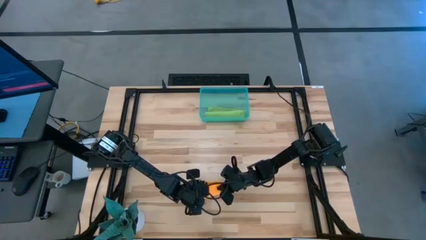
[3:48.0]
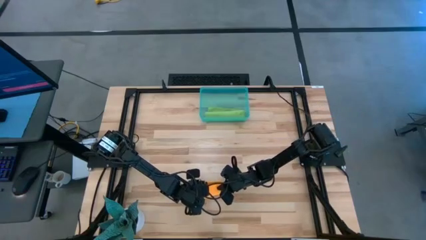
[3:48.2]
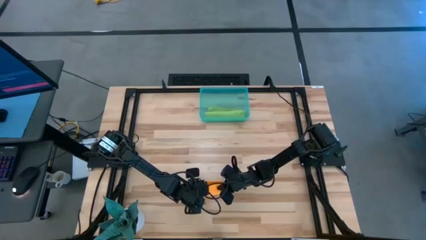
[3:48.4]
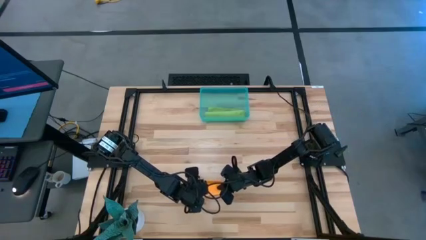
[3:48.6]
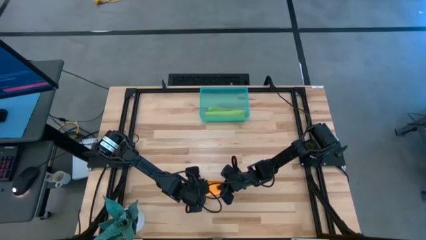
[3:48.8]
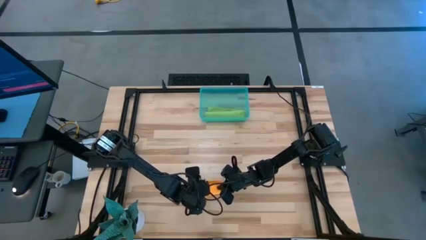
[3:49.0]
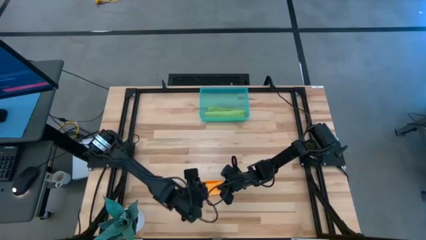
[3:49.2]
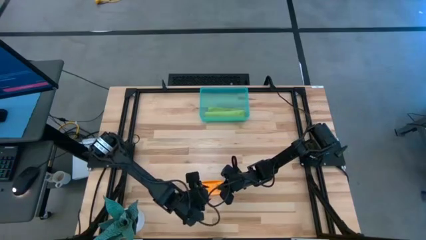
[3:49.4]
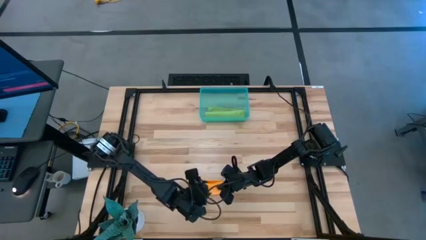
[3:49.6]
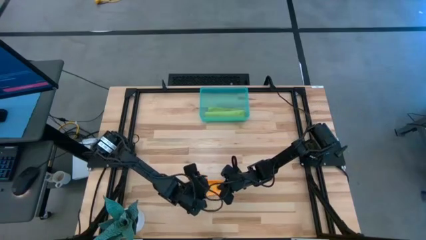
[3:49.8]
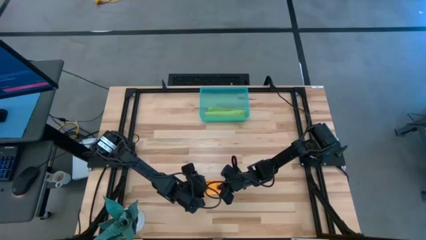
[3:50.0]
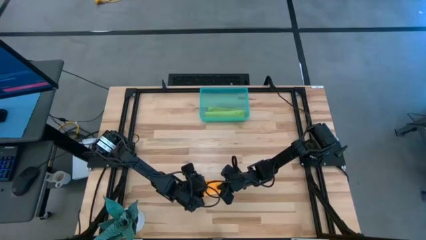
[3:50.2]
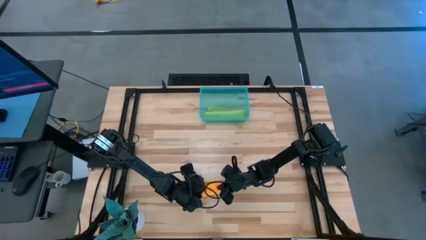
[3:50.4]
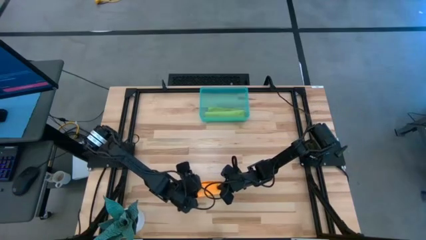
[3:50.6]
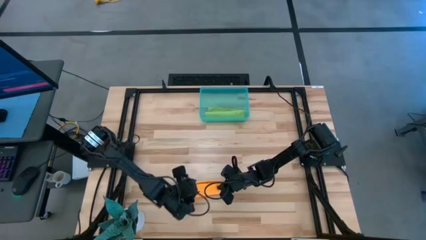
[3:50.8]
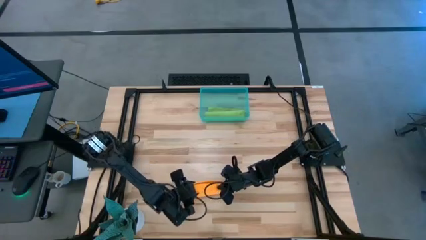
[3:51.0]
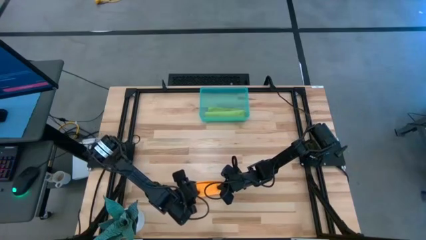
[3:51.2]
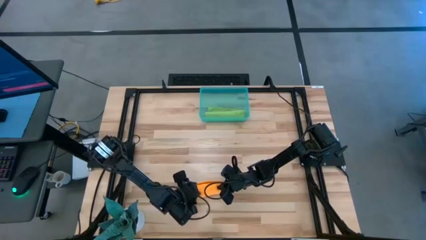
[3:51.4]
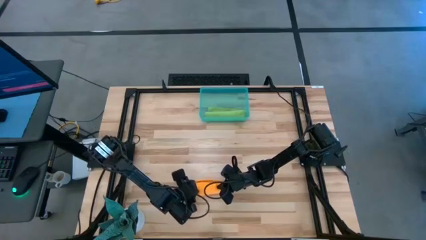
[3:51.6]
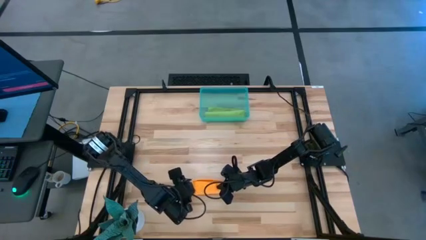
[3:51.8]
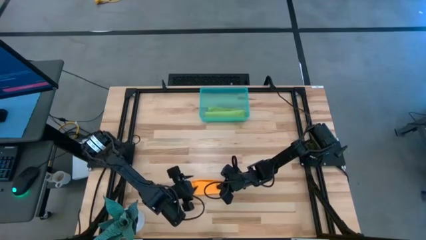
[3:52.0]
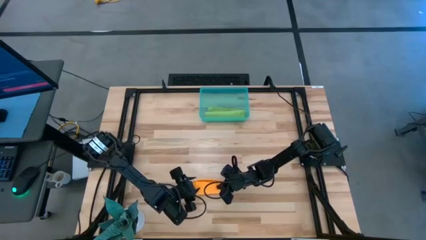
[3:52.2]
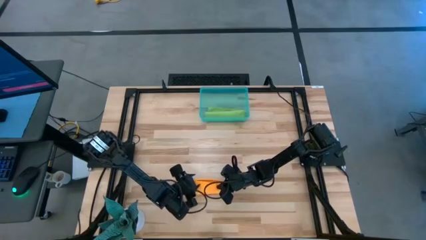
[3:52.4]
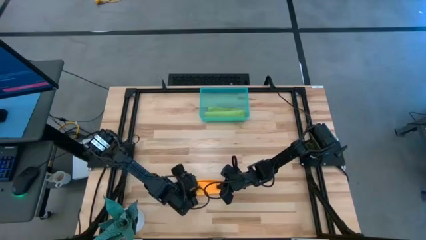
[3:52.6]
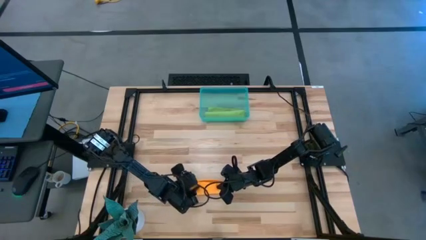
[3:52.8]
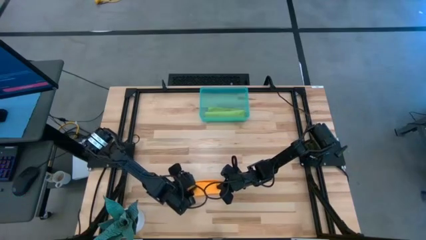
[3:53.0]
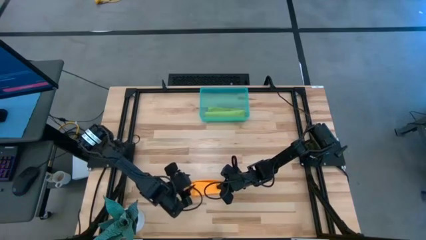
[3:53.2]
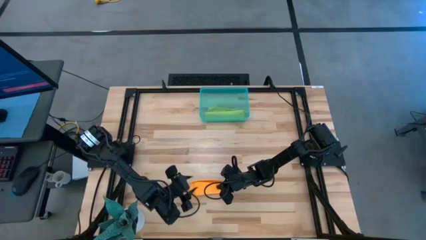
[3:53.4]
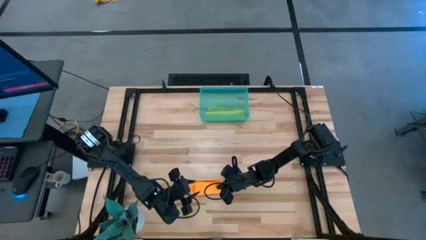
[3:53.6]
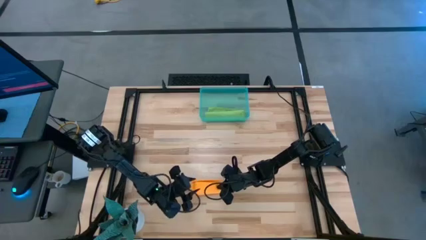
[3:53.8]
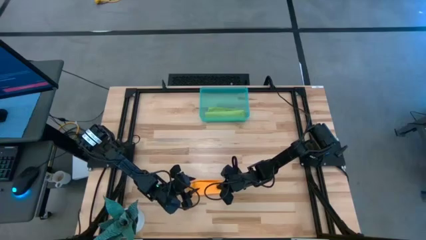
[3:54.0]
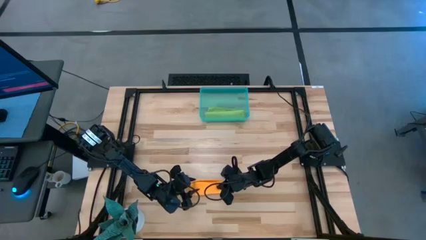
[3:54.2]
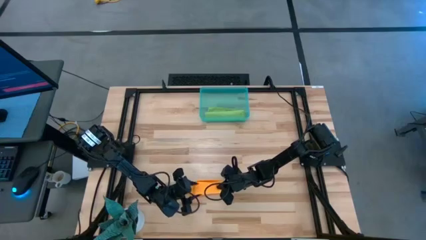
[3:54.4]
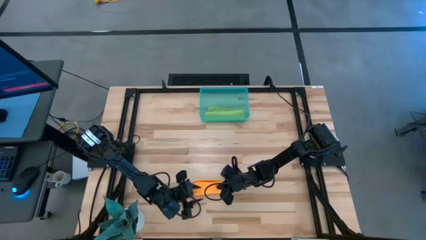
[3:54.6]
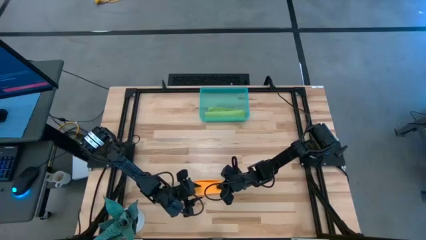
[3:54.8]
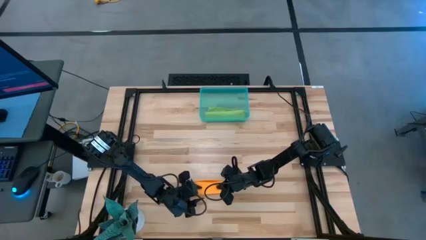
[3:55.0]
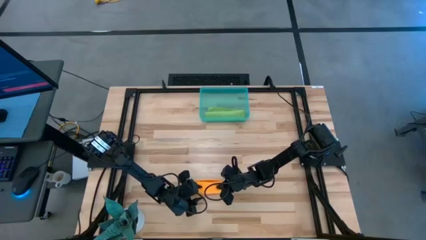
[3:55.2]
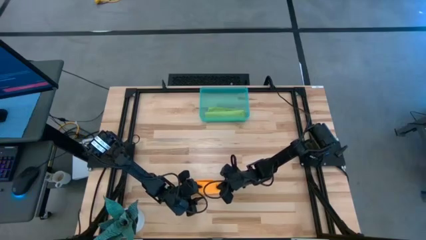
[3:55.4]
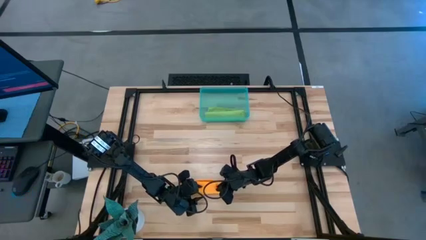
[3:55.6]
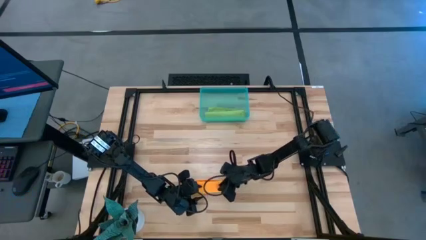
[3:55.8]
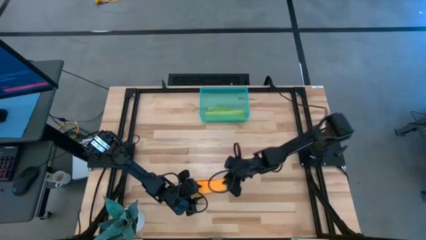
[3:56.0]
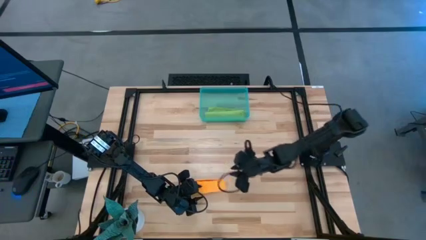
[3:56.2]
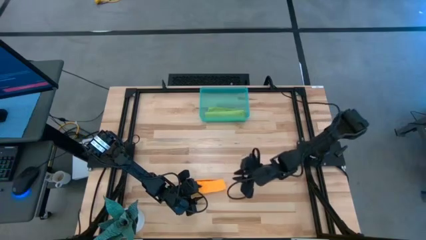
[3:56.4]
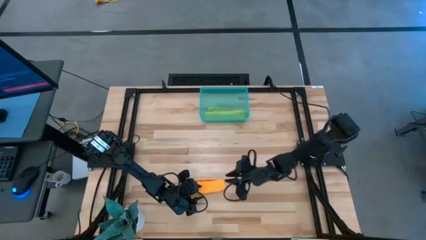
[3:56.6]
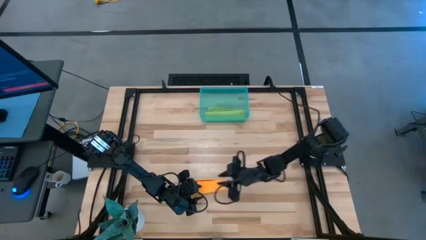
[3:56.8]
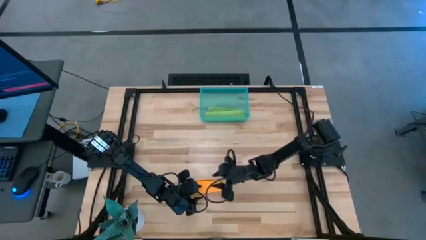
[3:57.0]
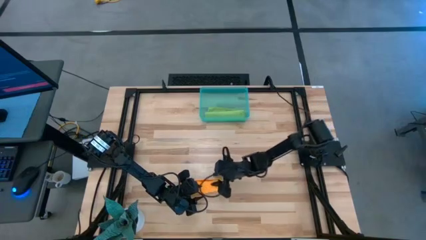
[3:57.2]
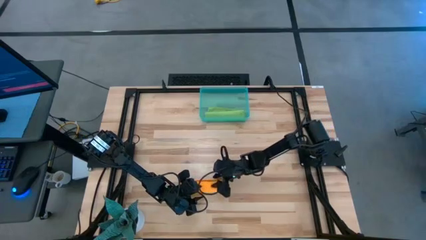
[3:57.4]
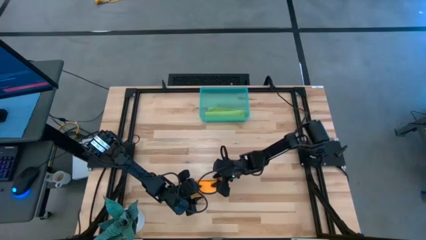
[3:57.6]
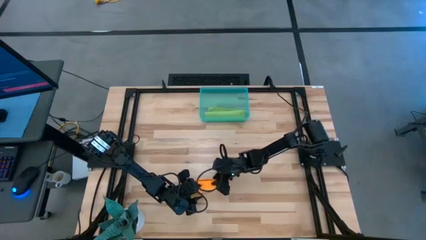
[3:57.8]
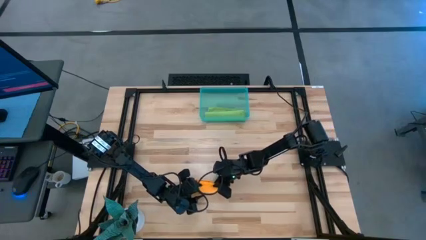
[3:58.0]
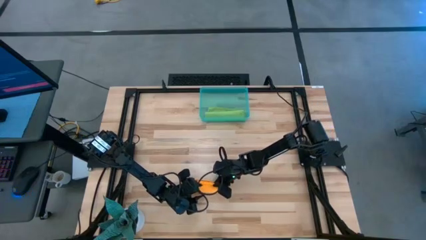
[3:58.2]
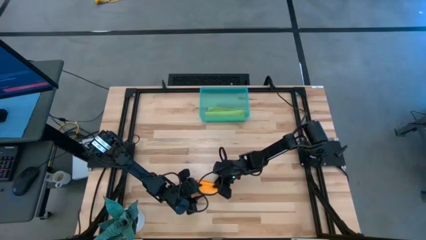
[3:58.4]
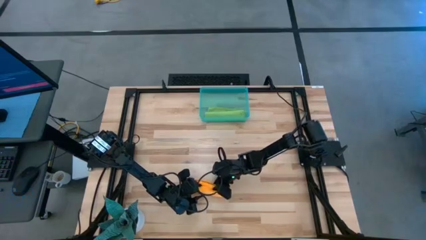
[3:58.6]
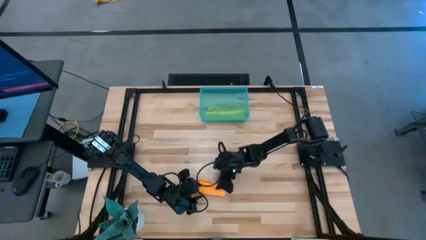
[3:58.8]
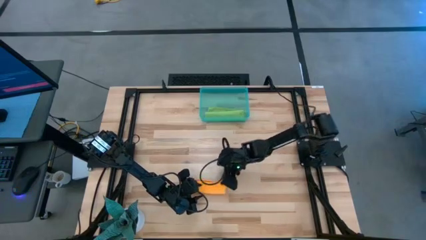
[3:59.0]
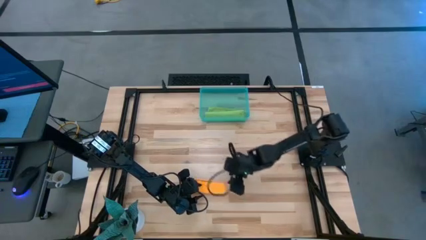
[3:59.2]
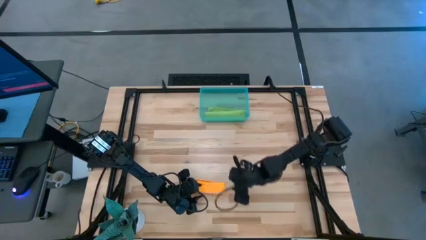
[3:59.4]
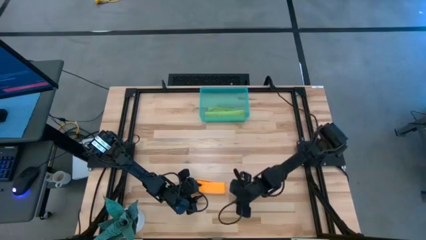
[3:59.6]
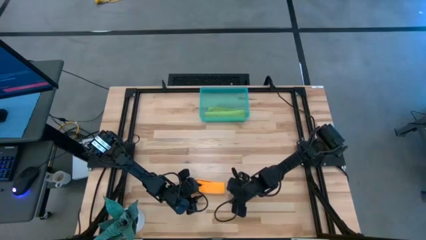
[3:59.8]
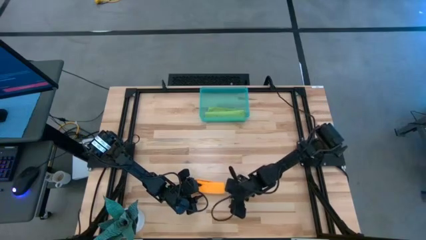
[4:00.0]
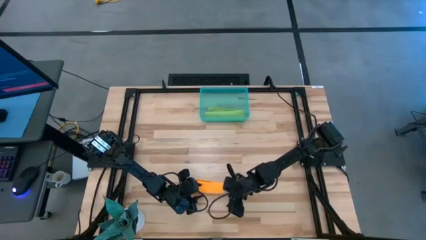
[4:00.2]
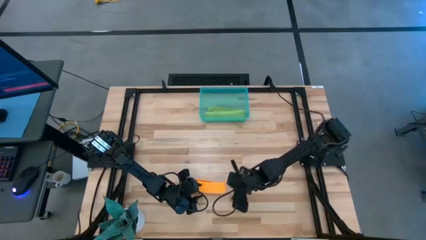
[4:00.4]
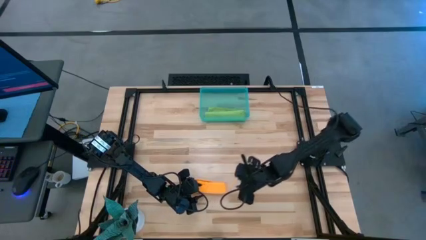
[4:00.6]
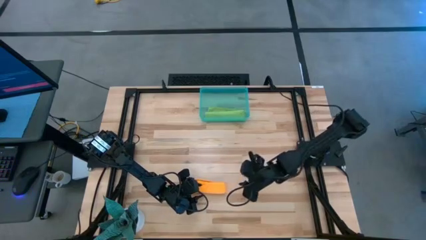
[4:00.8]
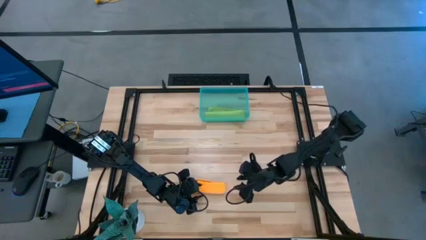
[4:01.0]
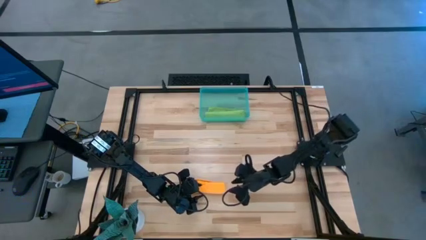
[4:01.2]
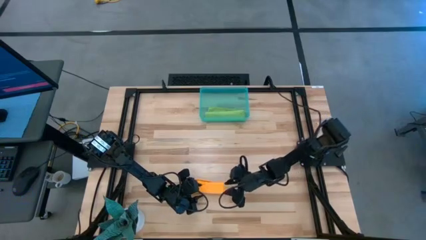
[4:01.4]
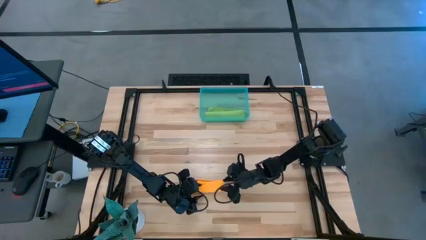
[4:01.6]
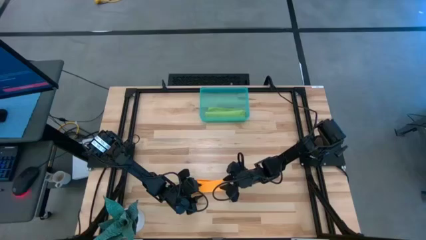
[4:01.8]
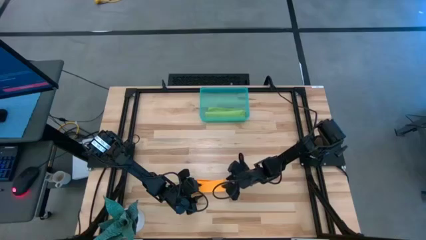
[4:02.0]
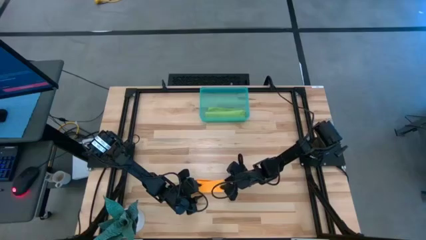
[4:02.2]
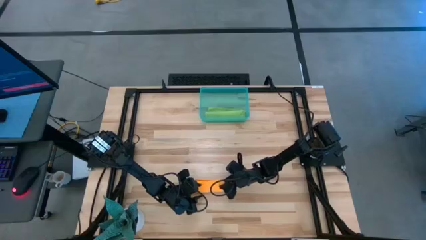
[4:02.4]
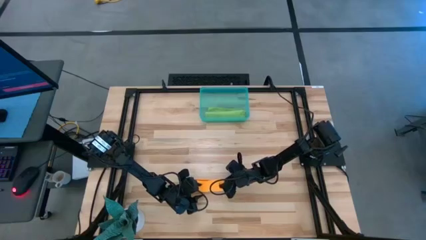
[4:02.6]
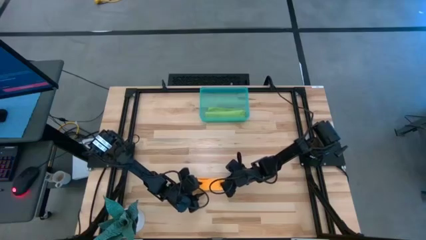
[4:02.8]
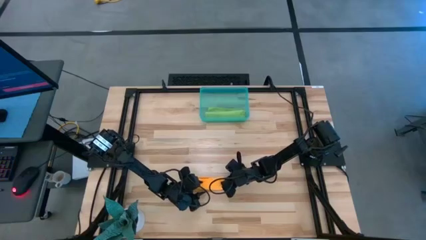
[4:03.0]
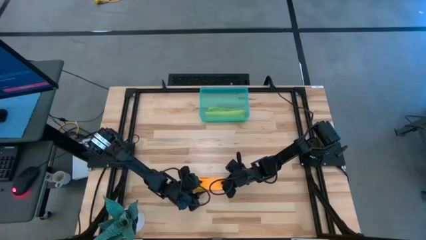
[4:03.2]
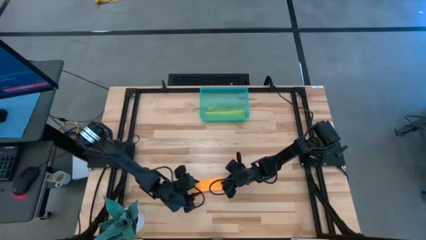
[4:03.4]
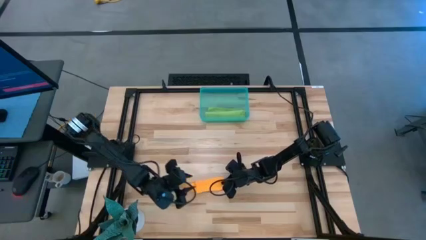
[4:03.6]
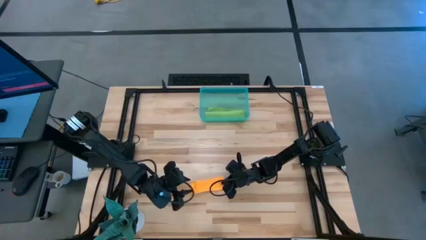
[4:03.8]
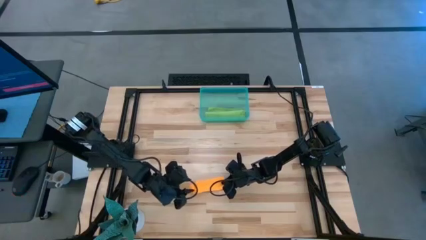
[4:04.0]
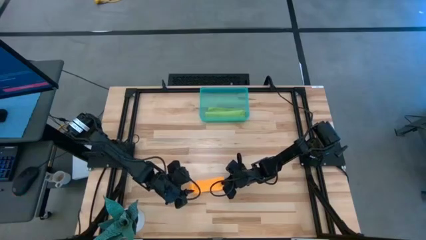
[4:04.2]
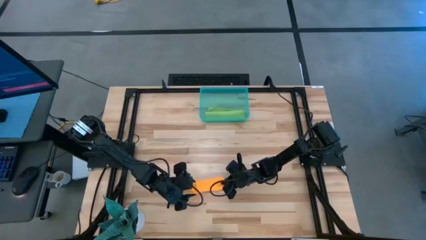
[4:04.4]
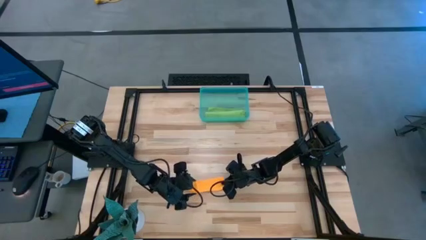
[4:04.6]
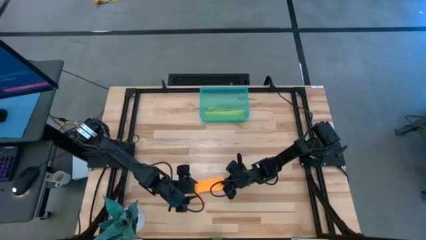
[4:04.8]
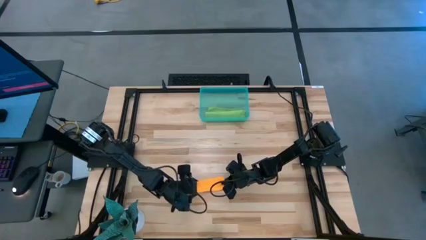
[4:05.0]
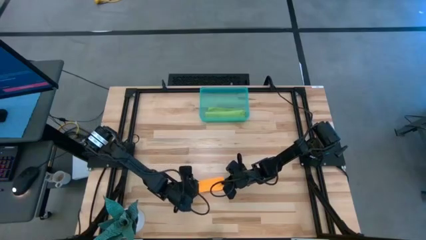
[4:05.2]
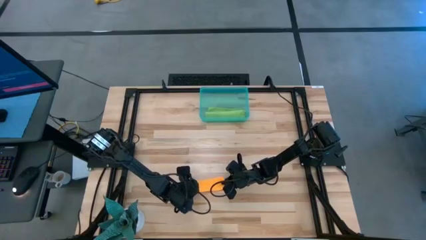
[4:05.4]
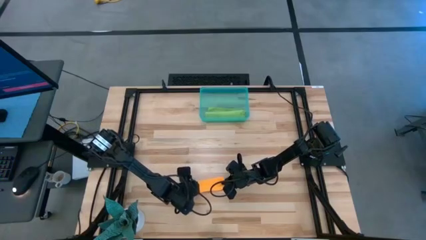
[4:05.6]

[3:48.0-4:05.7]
Task: Roll microfiber towels into tight, uniform cylinder then place into a basket
Roll the yellow microfiber towel
